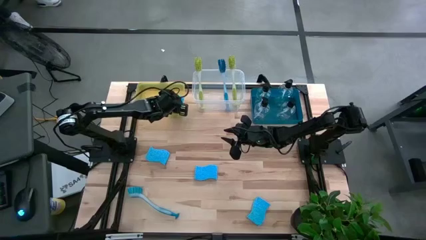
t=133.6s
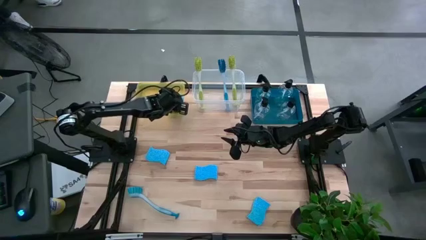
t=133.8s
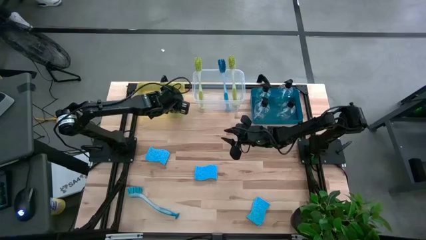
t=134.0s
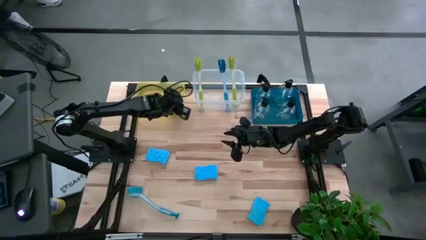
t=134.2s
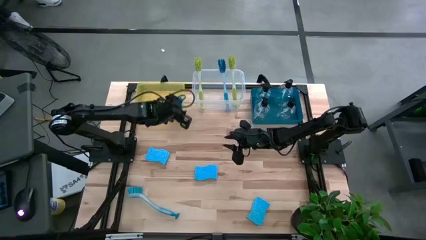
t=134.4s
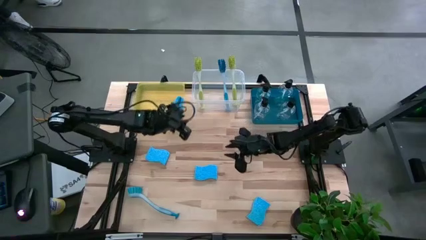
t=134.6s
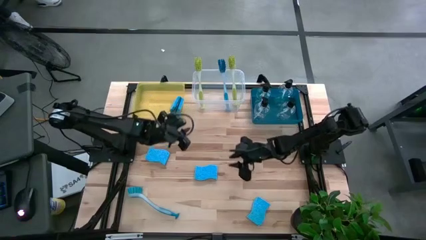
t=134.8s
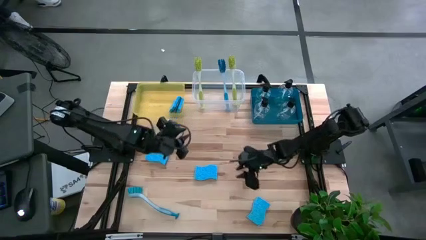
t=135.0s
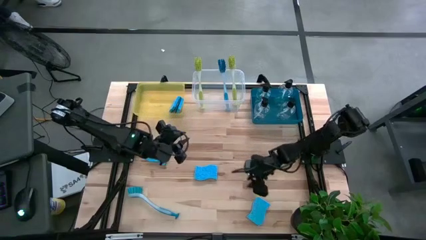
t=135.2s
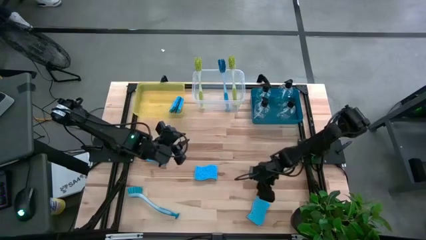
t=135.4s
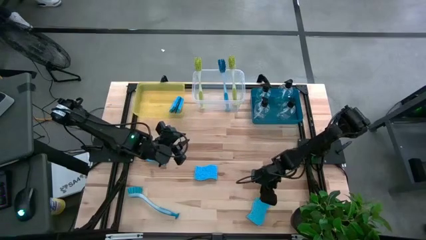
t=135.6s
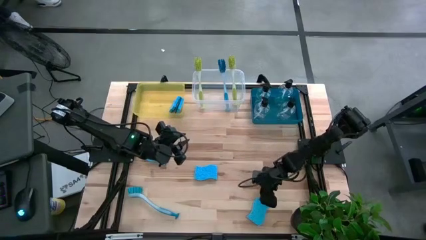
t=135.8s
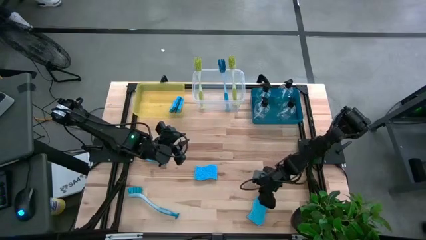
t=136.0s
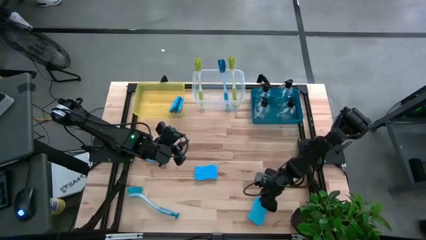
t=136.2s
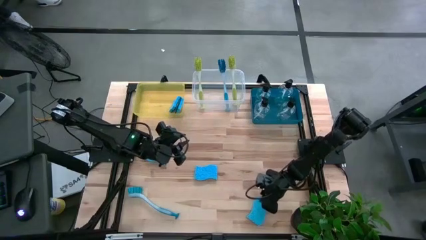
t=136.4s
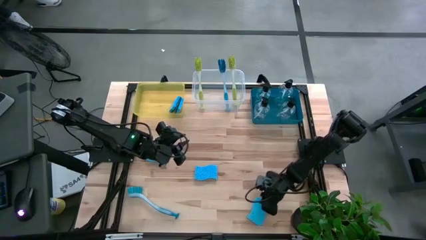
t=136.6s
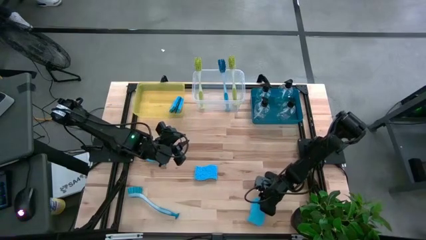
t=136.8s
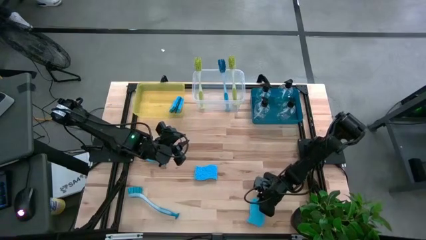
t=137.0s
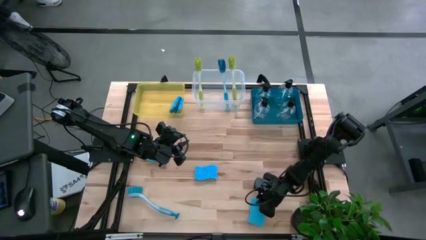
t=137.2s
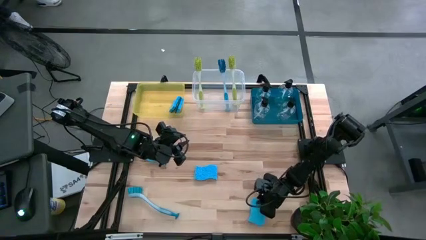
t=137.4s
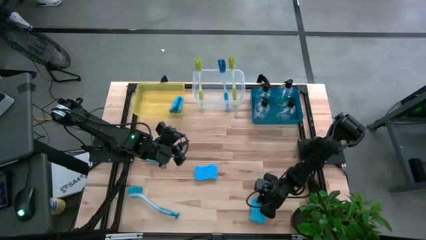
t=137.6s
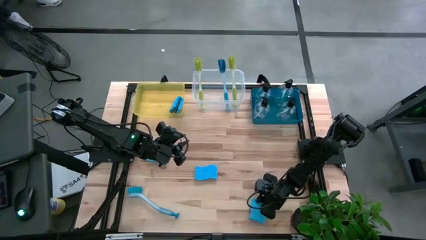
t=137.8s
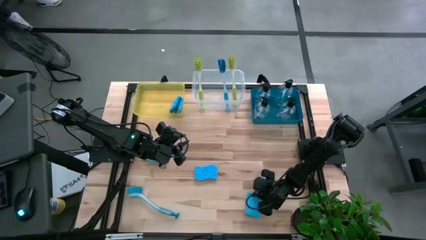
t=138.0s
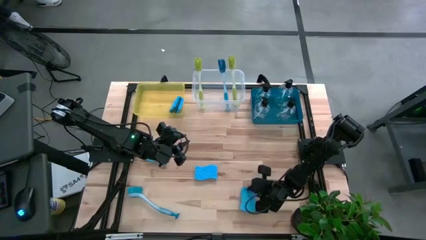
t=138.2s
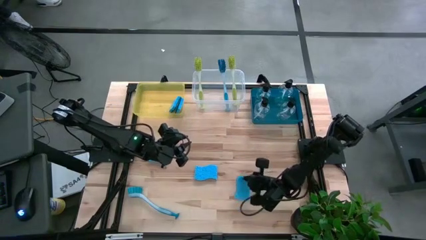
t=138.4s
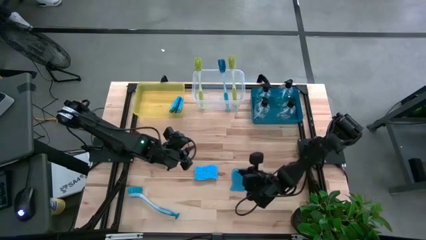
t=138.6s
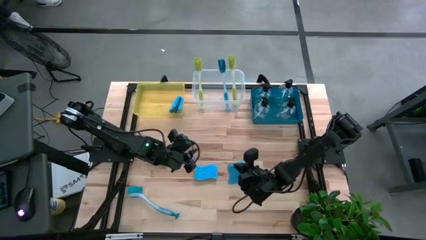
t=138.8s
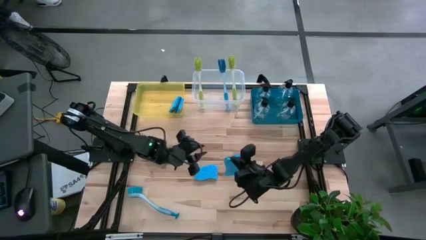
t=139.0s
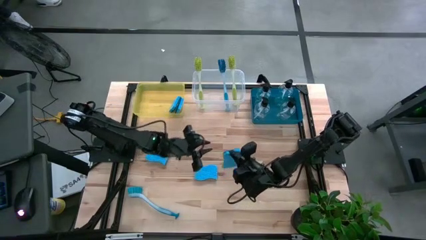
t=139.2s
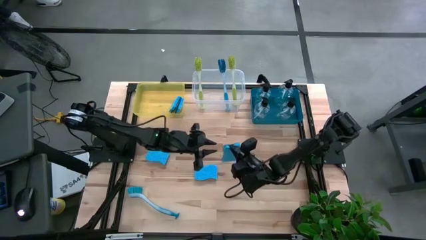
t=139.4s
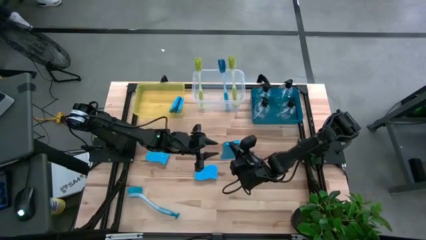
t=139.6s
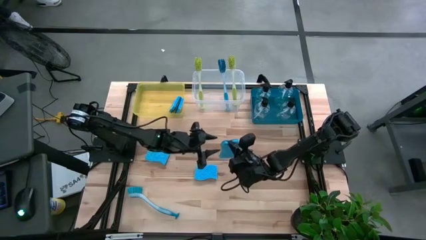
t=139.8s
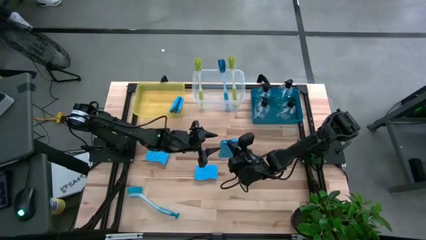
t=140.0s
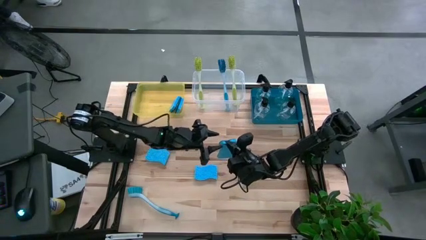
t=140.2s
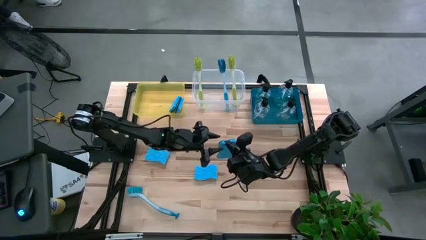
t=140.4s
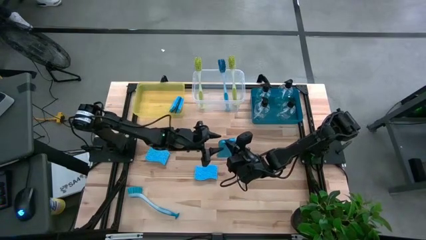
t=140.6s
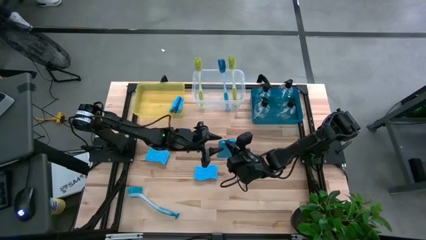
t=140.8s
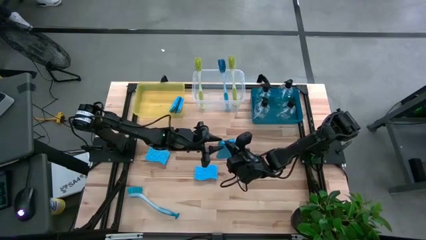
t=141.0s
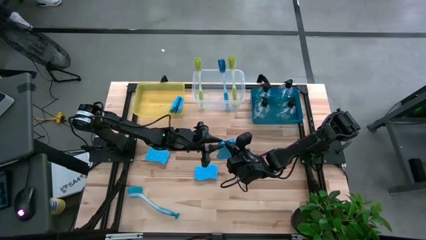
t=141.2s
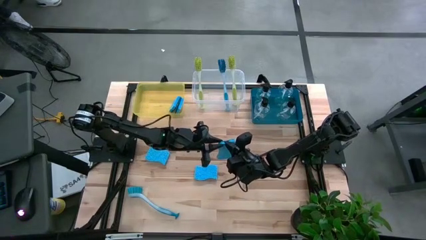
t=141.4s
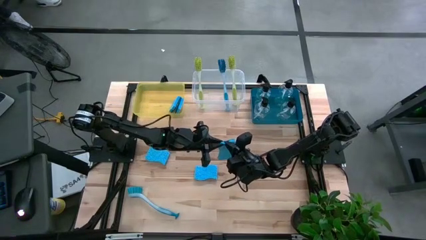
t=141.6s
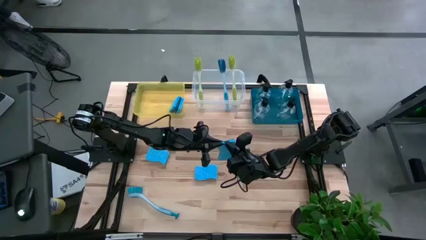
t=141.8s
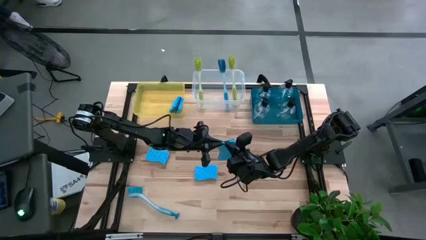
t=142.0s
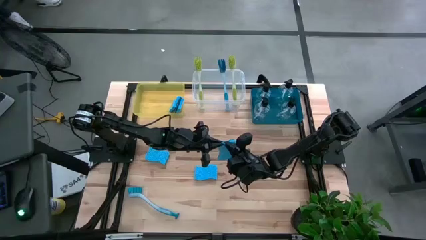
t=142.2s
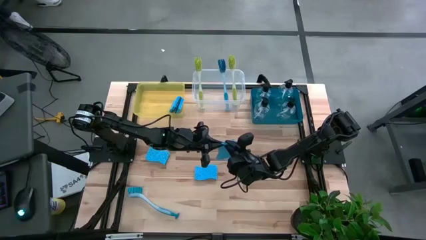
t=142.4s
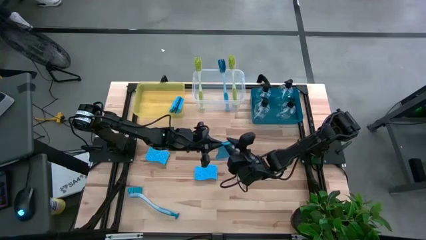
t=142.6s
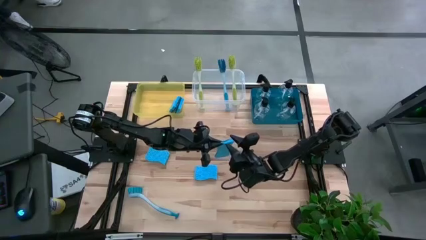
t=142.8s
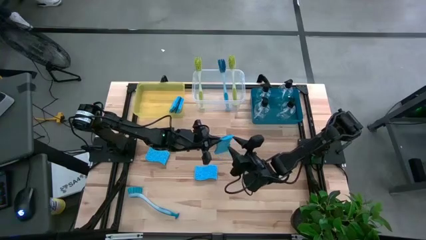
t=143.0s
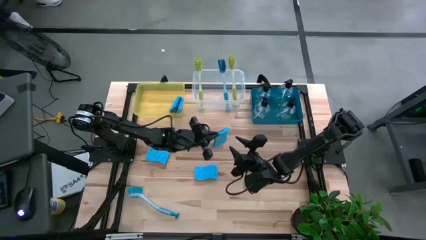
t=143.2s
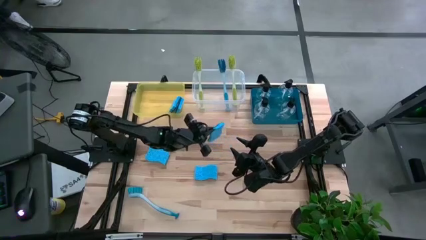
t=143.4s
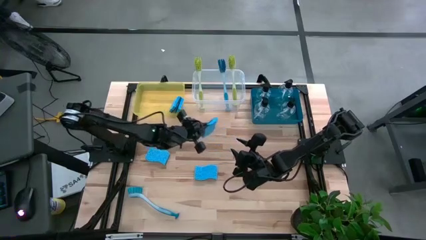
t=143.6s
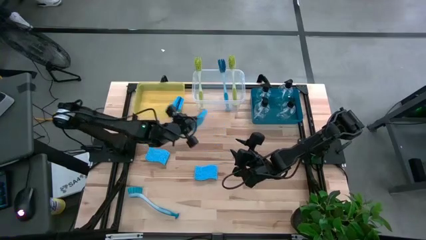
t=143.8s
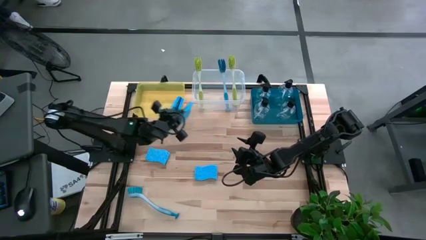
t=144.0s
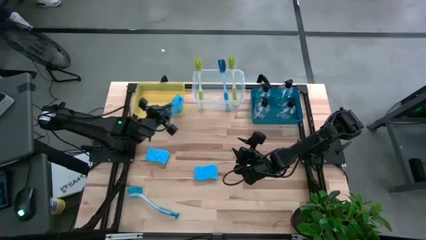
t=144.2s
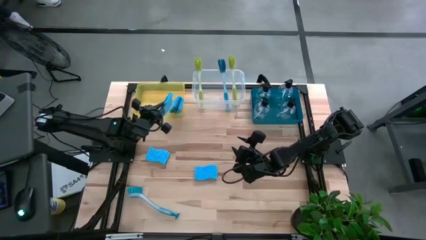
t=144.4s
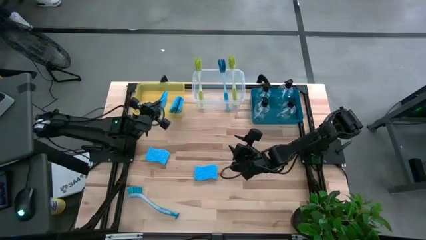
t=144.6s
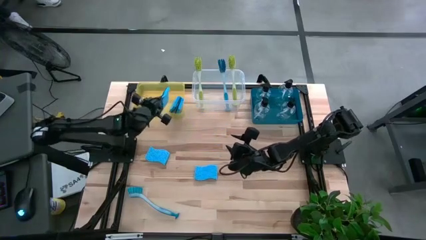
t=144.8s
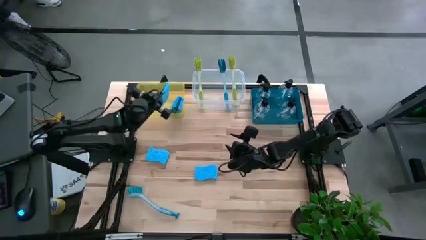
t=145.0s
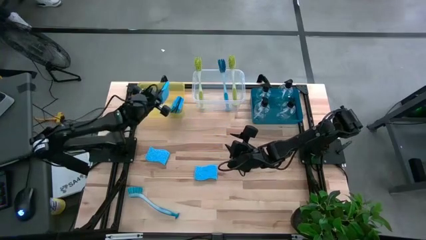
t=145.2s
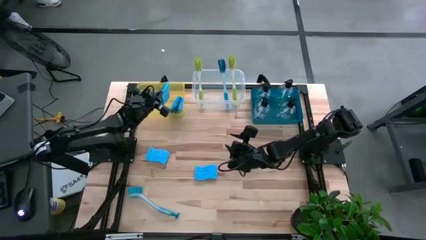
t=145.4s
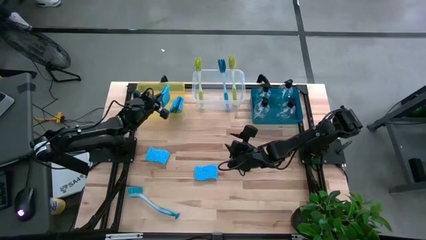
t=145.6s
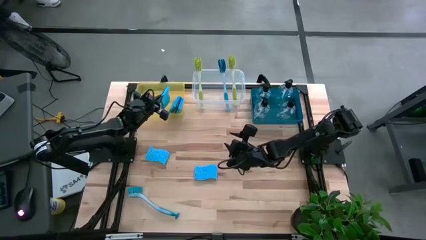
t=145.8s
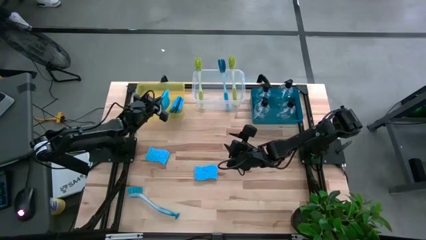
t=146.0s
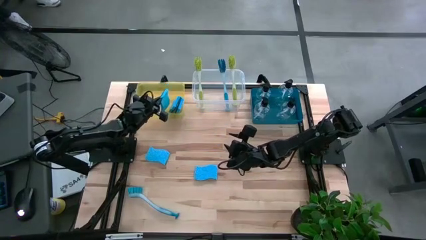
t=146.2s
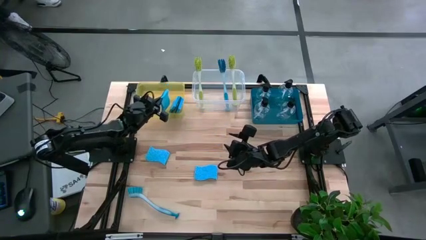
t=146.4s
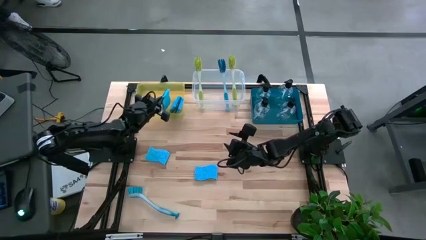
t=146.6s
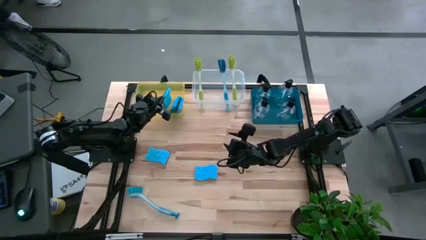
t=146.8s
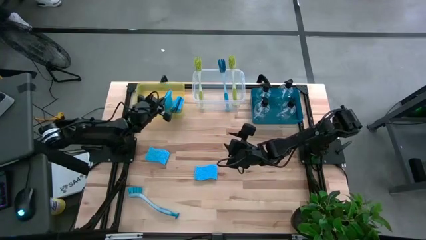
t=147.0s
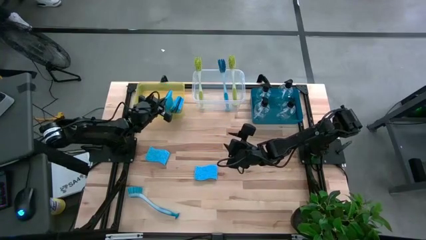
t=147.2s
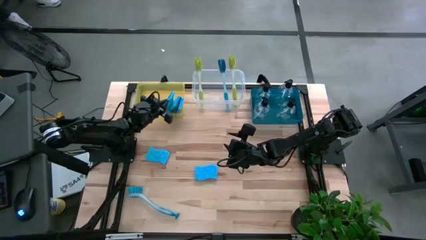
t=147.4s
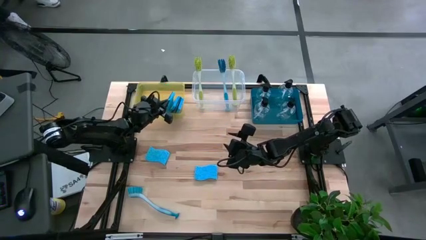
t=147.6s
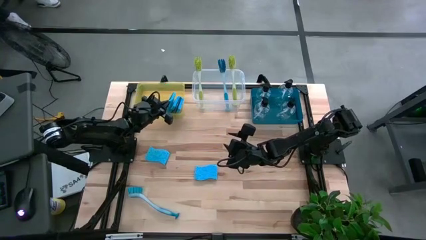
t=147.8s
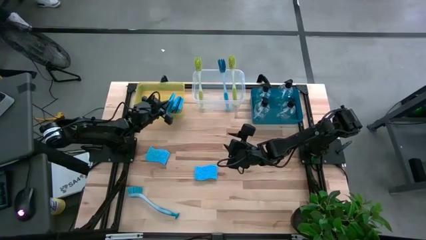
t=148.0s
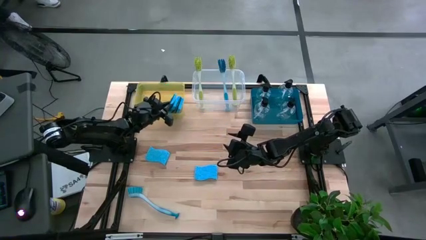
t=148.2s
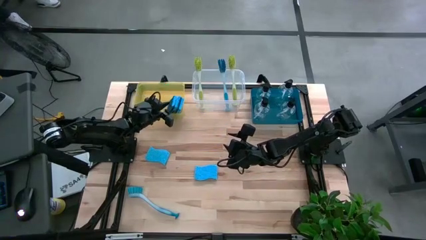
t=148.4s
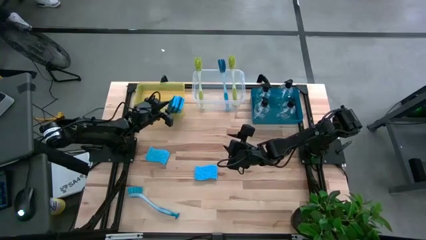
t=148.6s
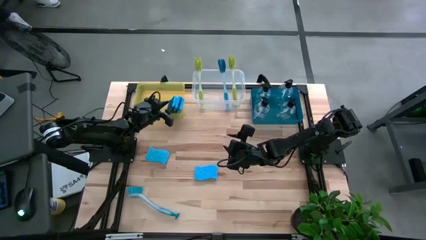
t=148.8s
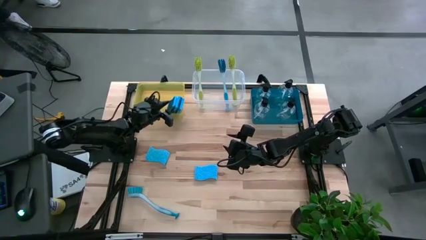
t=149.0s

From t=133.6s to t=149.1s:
Task: Pick & Place Kitchen Sink Supplies
Put the blue sponge into the yellow bin
